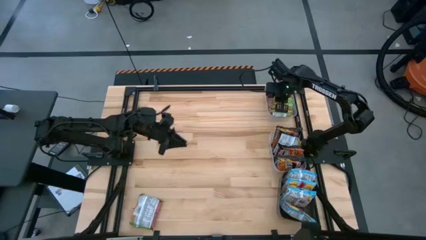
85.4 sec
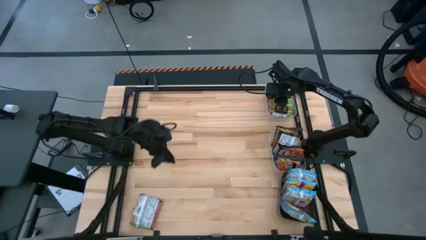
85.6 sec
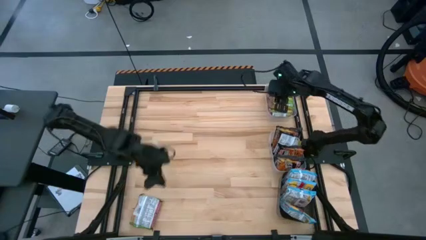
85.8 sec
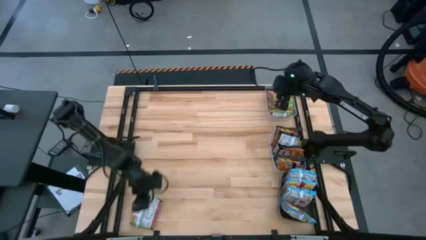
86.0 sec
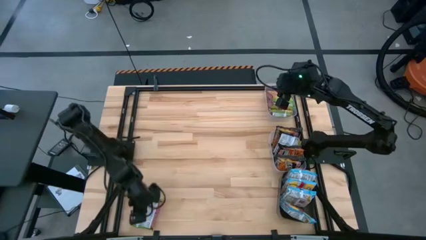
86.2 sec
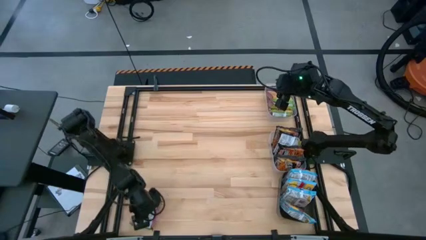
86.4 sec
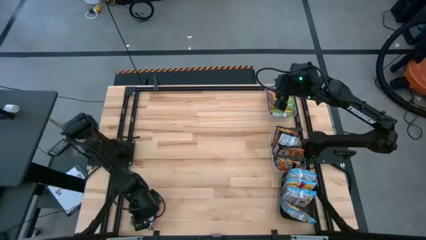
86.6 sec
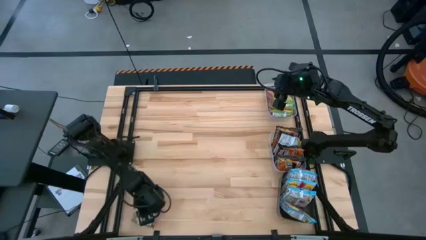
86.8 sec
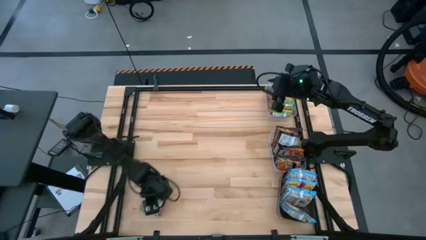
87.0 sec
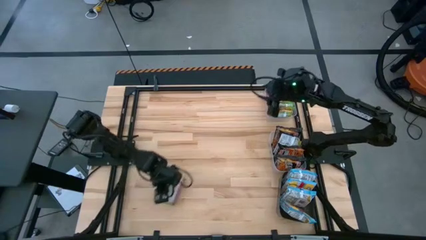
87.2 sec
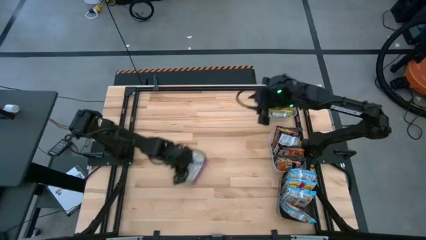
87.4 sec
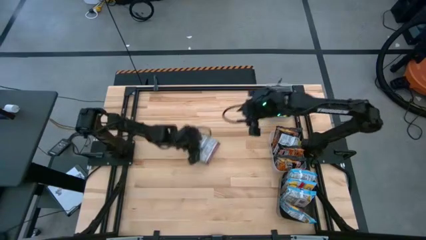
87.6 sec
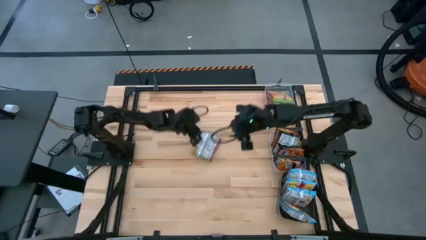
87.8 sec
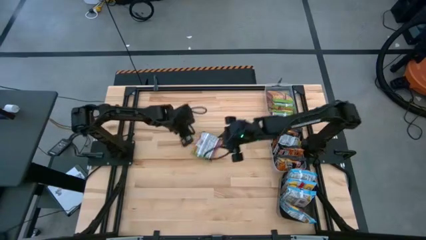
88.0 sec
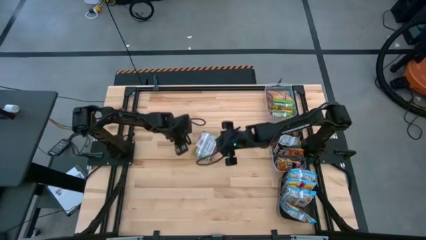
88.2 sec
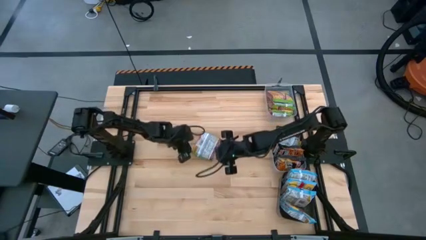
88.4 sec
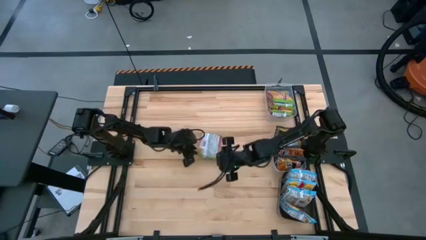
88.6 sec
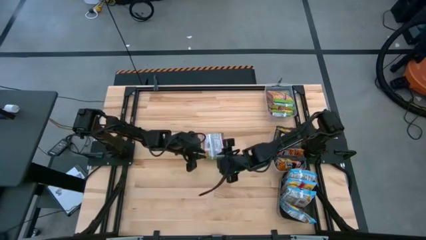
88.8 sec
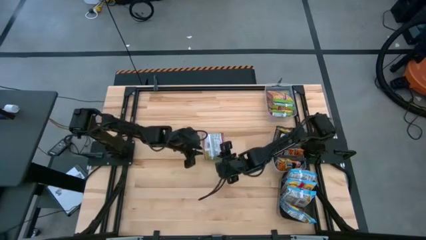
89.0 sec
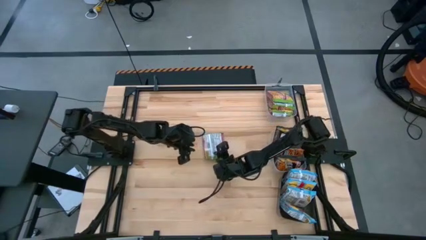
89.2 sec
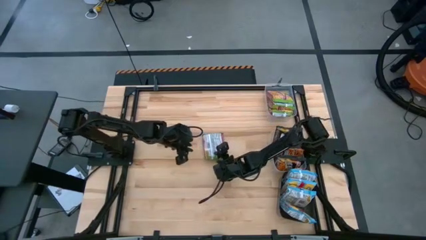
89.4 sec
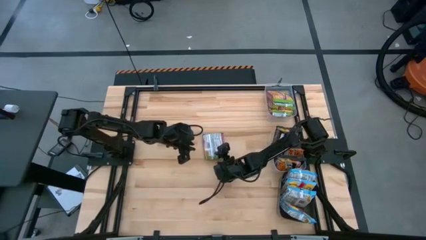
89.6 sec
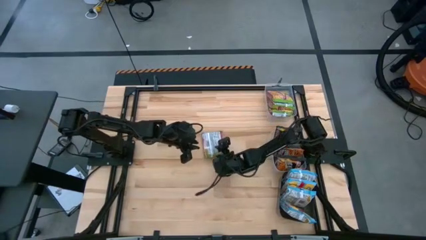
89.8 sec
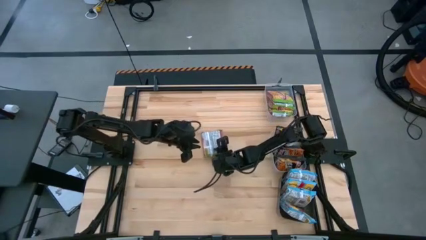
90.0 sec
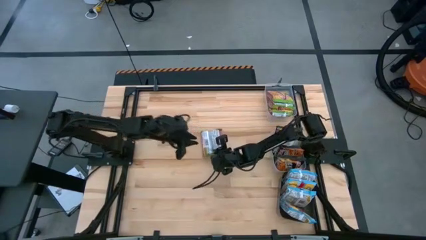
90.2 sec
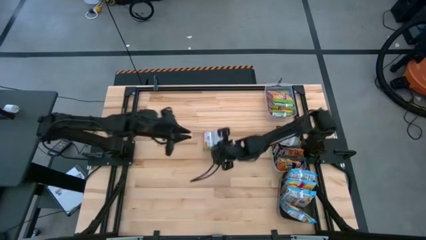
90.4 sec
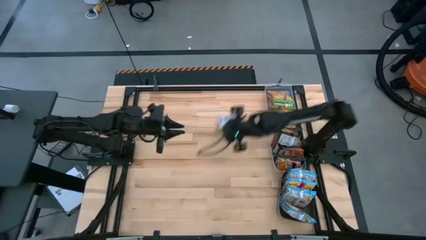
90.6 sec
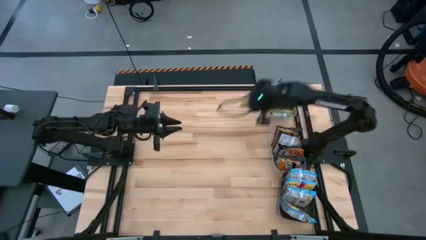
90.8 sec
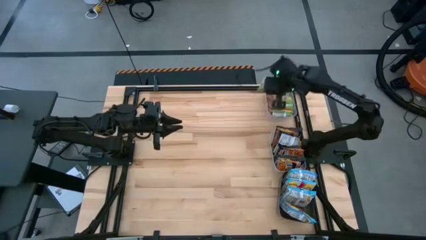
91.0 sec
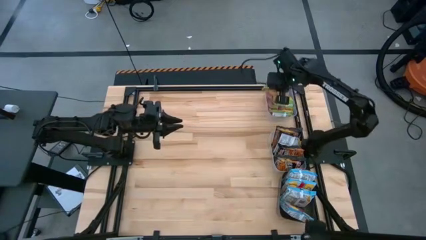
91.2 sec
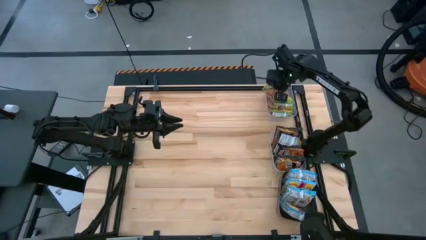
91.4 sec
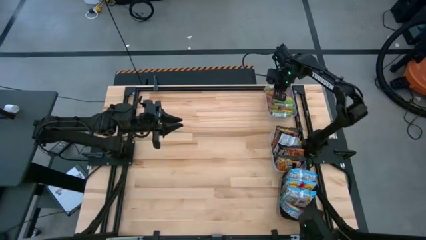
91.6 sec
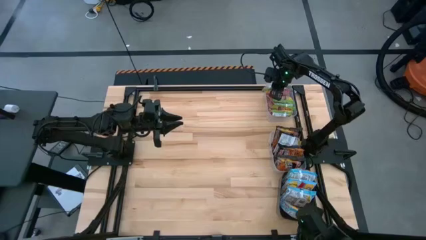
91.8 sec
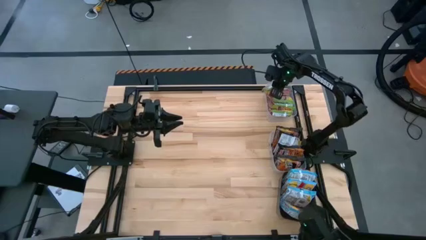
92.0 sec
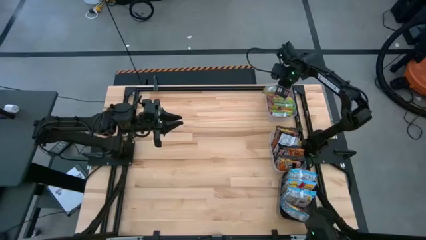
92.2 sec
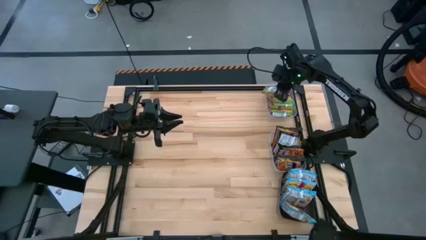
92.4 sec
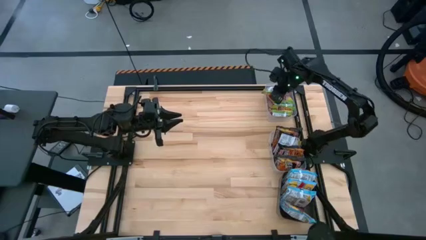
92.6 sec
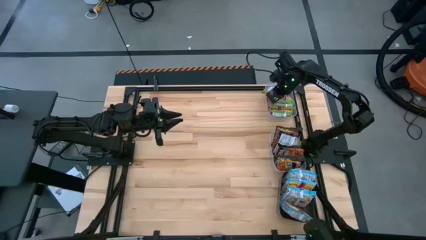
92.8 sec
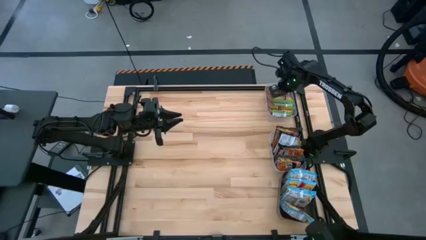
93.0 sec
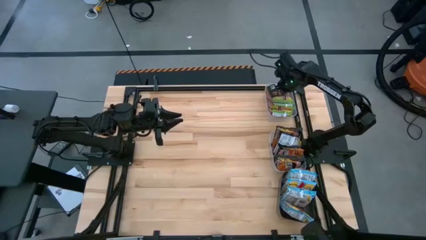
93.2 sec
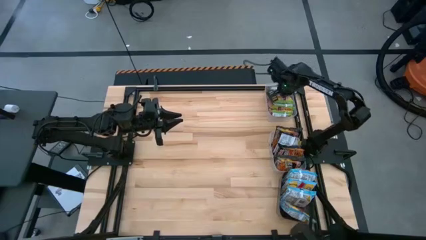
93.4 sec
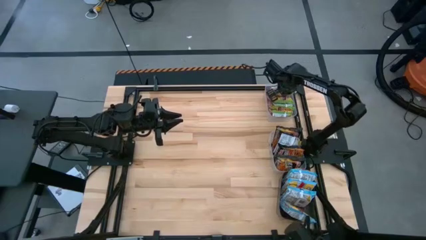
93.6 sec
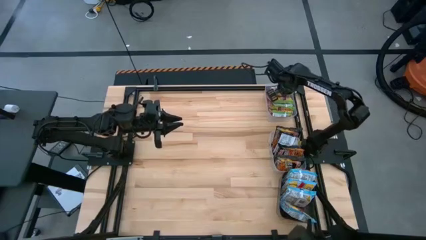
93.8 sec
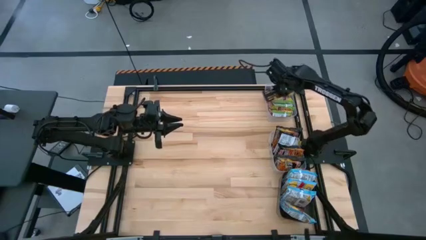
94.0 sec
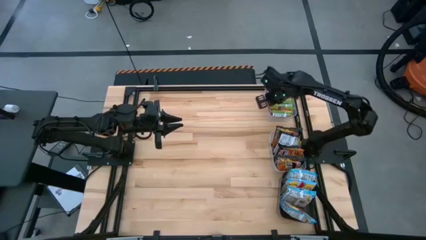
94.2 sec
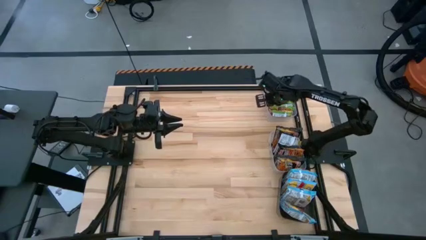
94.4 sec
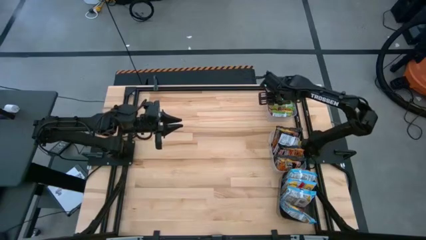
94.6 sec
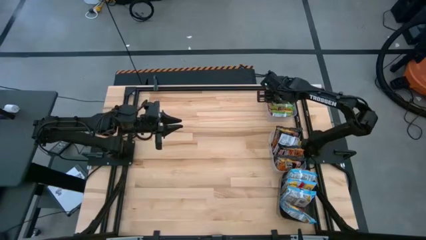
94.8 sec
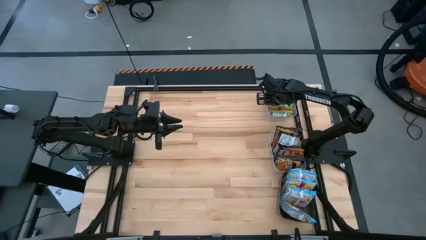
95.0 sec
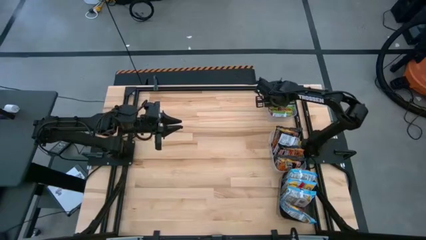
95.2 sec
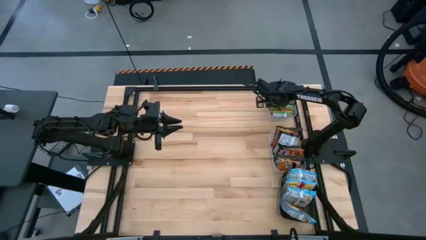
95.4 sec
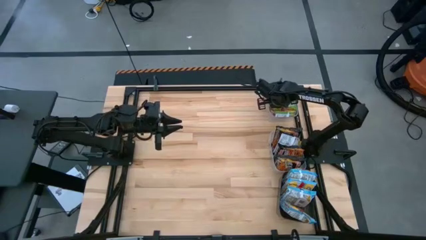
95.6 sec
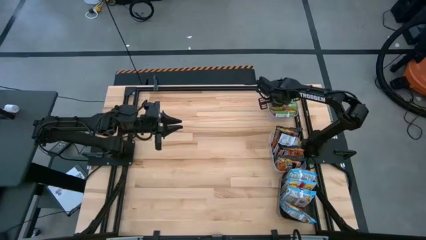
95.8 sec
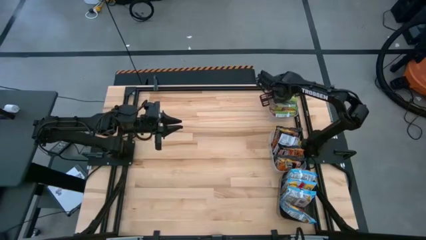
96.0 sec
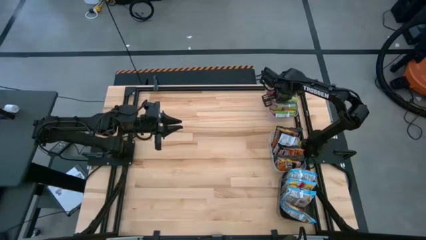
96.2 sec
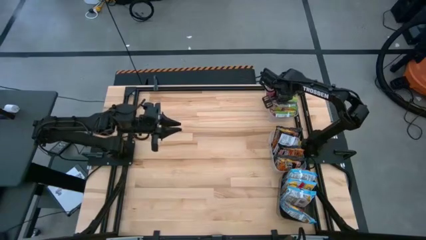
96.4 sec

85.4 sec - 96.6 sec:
Task: Sort Maruchan noodles
Put the green noodle pack into the top transparent bin

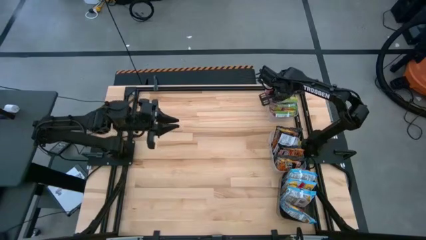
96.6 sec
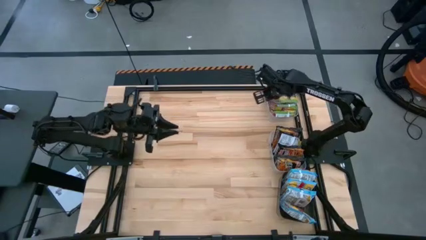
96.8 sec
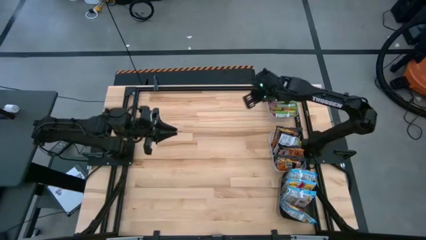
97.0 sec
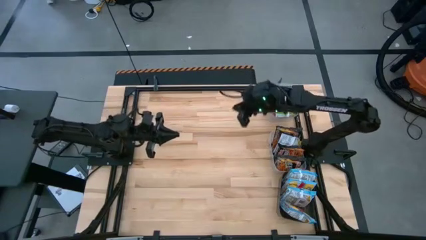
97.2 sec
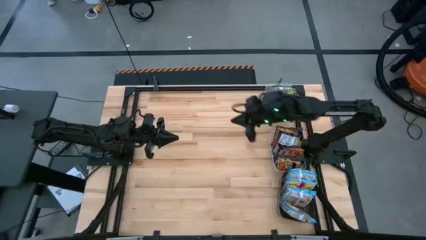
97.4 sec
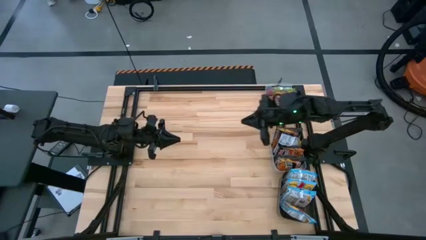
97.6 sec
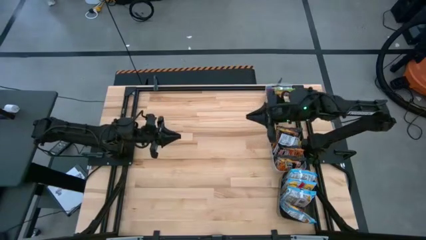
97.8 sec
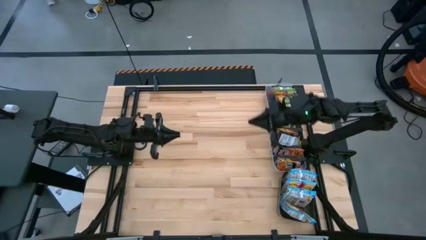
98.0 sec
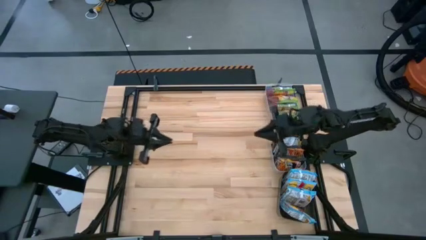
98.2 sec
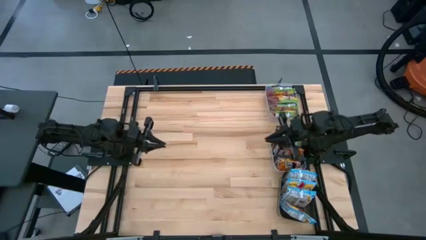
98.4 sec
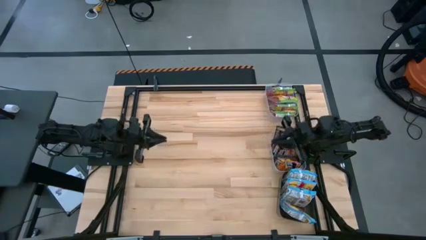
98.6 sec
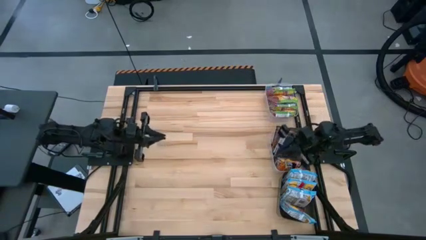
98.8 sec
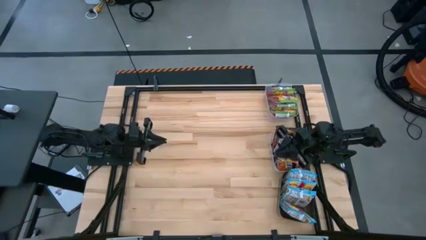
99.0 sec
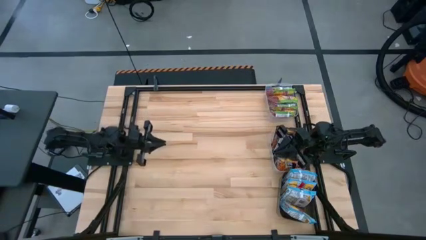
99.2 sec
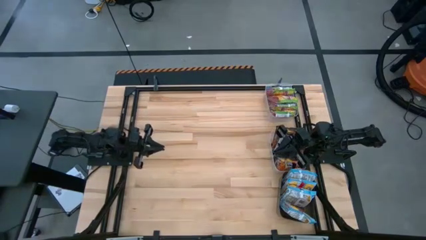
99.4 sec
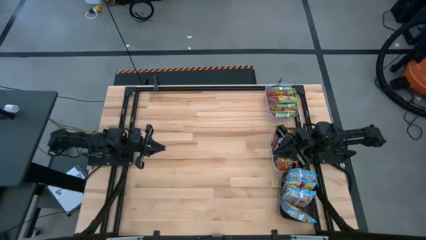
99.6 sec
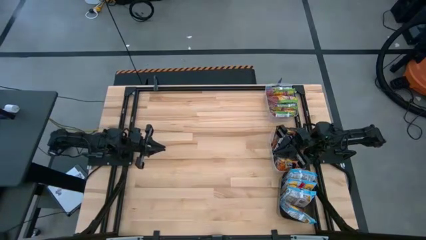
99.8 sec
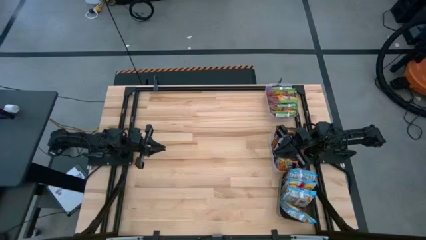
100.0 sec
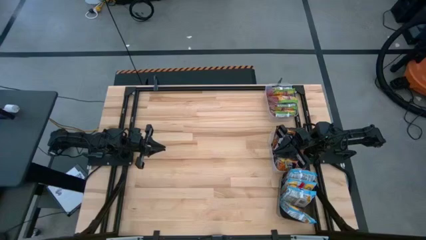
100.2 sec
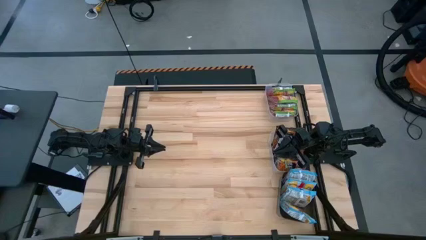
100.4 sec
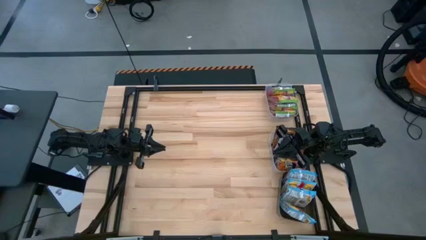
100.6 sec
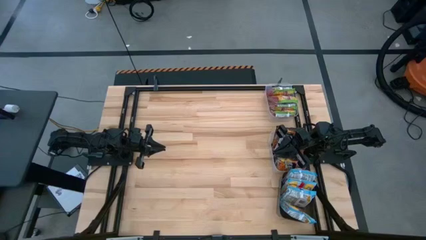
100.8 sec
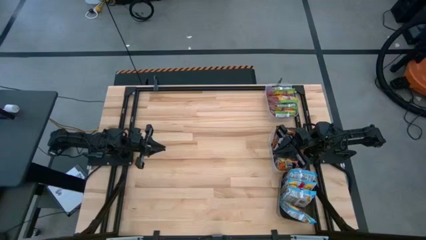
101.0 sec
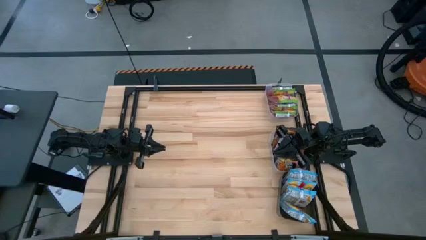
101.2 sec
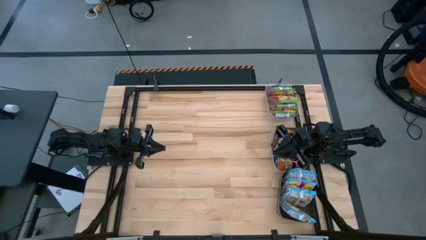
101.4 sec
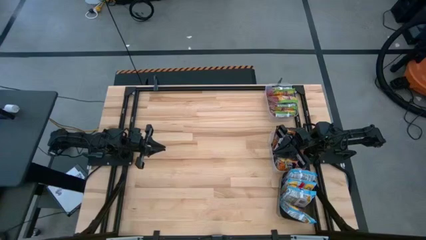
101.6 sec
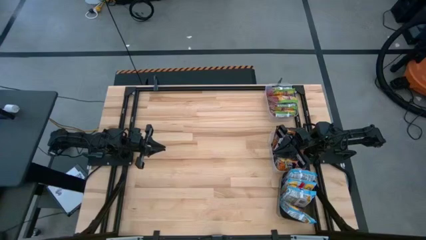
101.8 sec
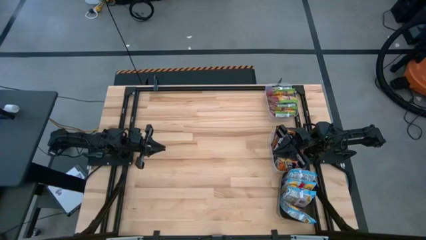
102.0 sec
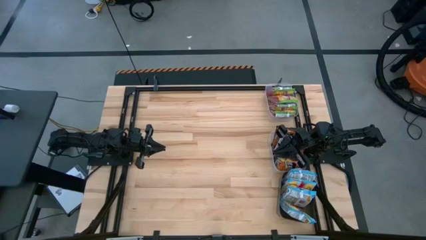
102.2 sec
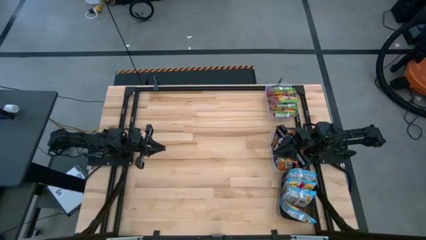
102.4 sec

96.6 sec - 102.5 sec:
Return to Home Position
